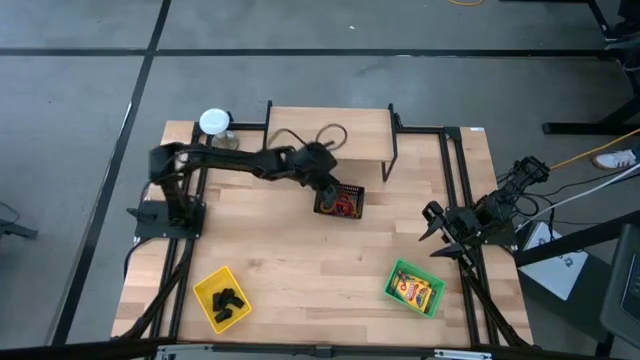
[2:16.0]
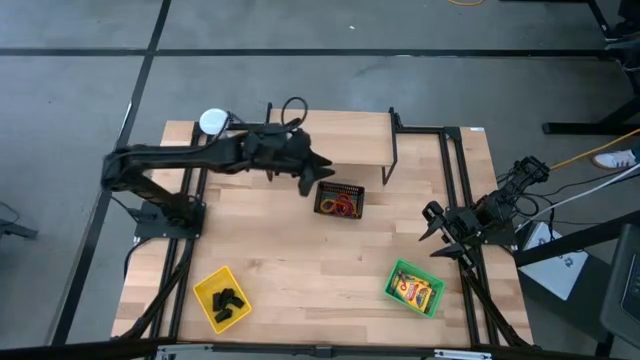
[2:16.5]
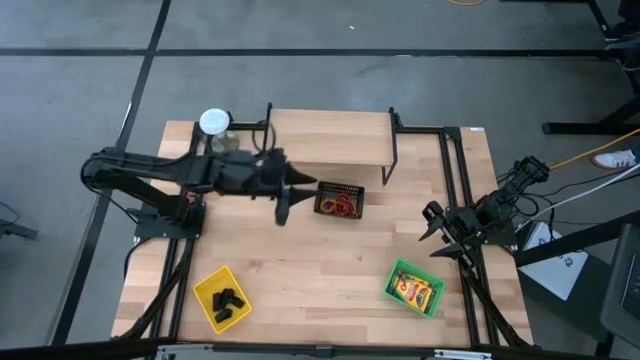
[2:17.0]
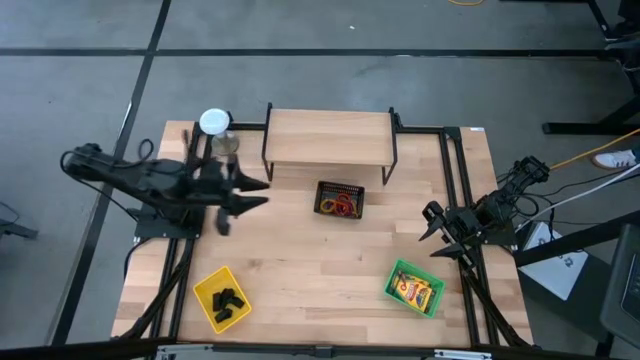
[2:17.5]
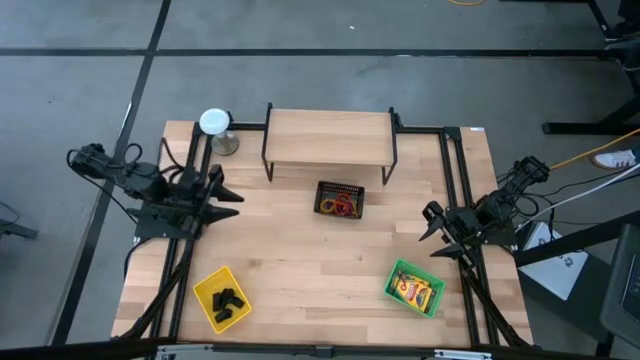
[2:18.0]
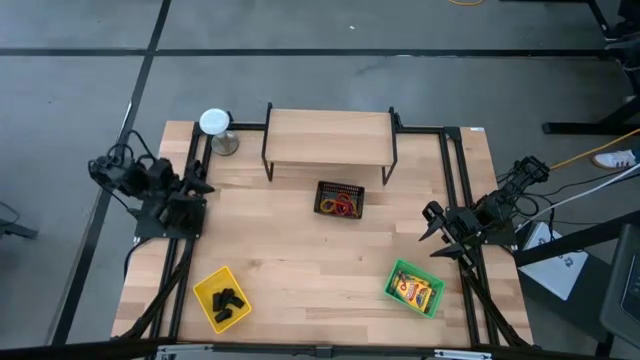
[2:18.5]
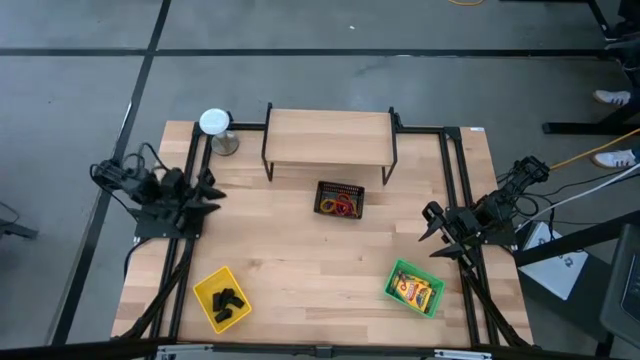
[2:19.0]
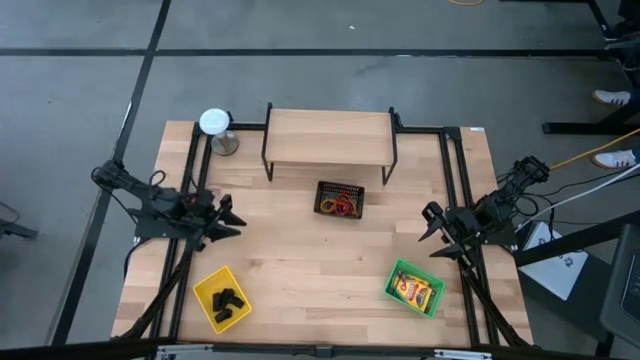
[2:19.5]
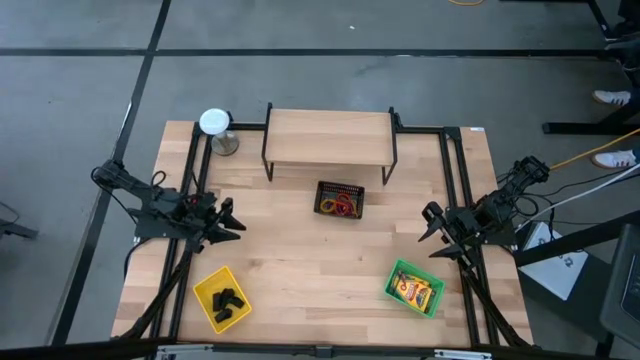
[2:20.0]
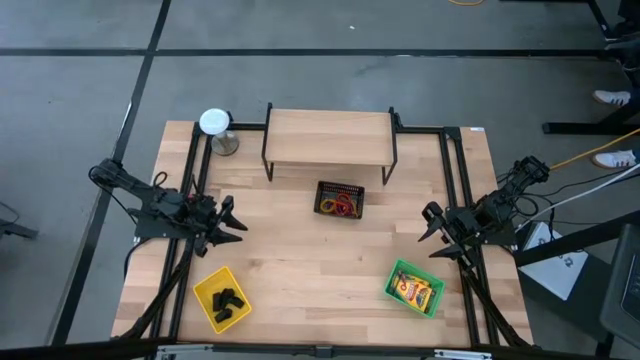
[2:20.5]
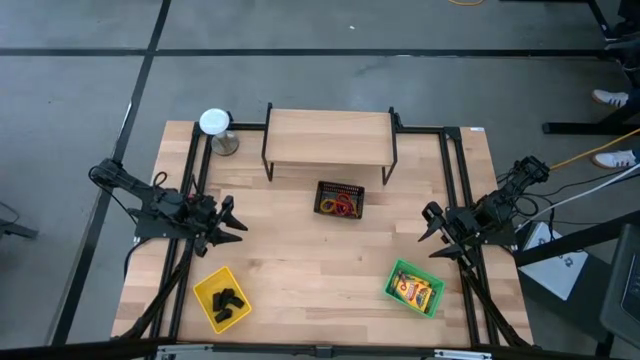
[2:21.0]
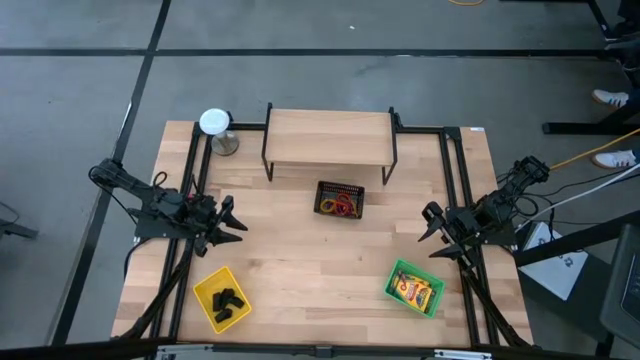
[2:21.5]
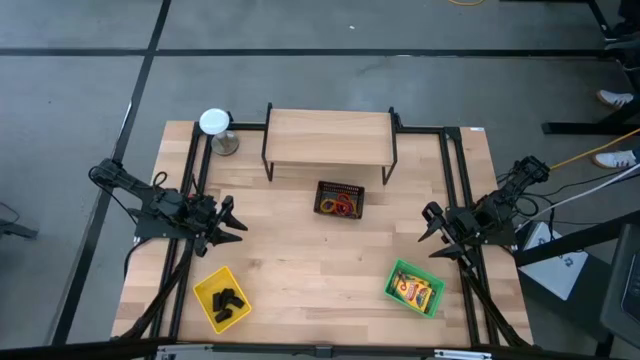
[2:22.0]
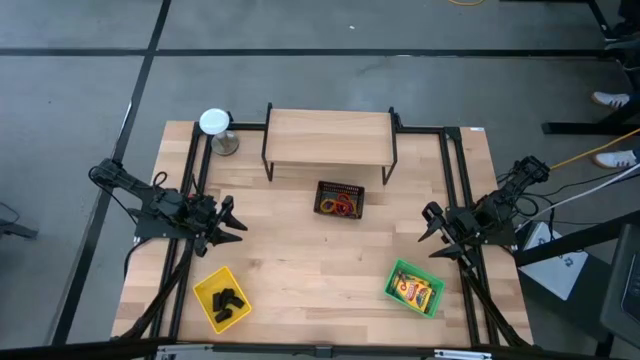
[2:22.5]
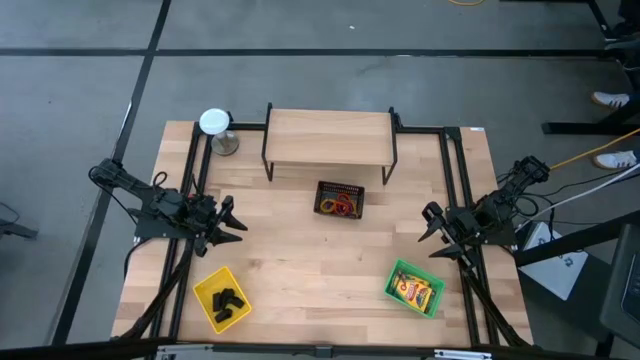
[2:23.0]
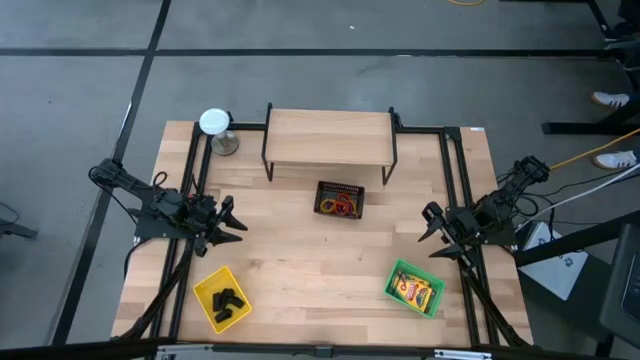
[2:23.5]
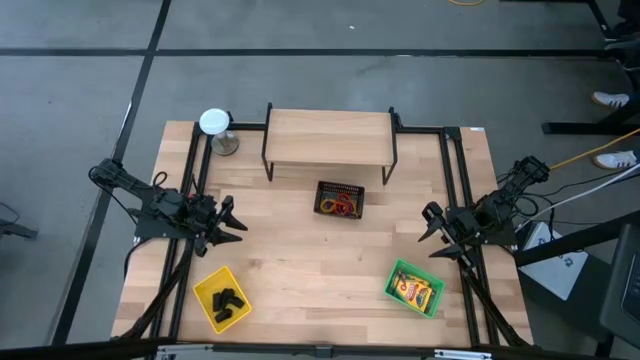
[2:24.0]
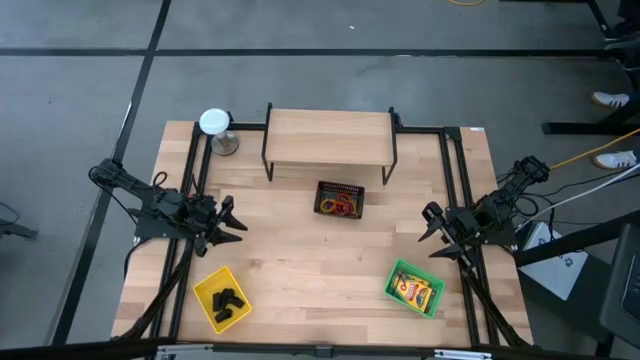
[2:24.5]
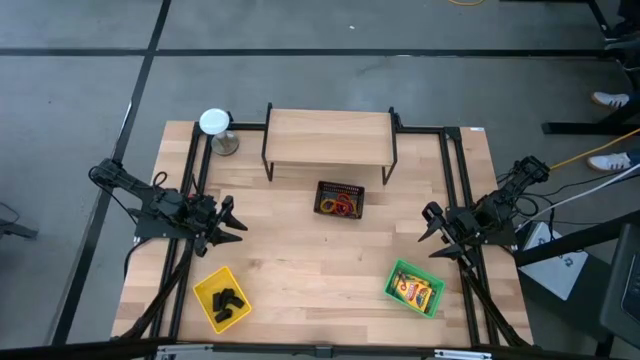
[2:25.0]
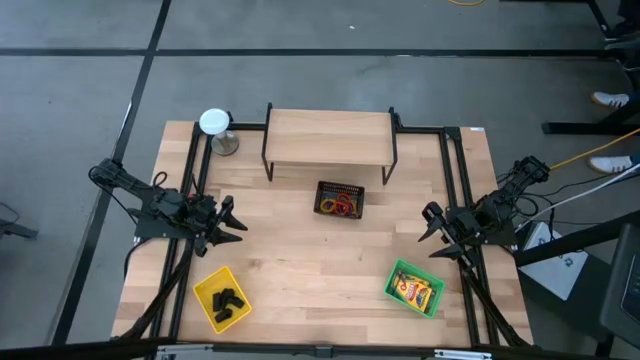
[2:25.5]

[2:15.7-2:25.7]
Task: Pick & Place Office Desk Supplies
Return to Home Position

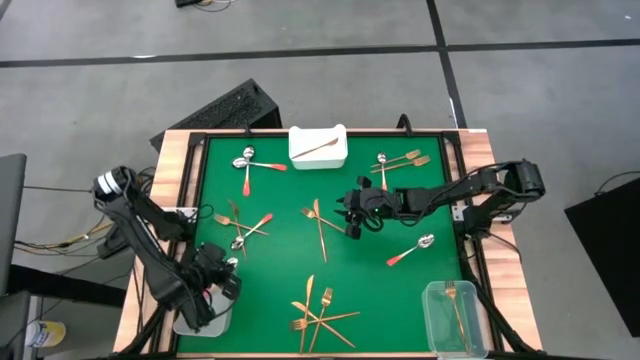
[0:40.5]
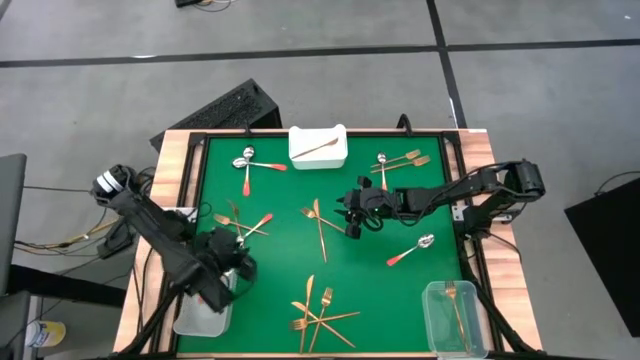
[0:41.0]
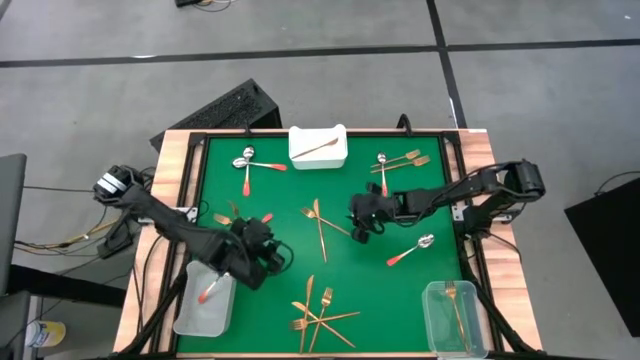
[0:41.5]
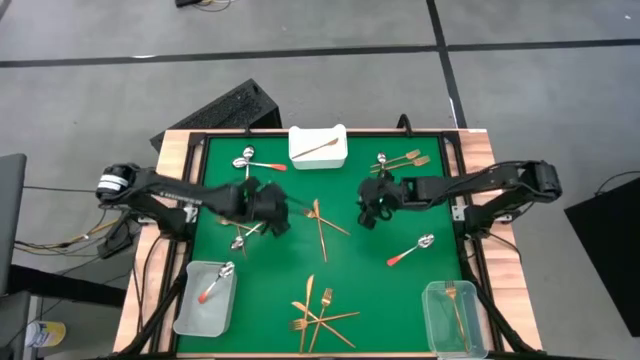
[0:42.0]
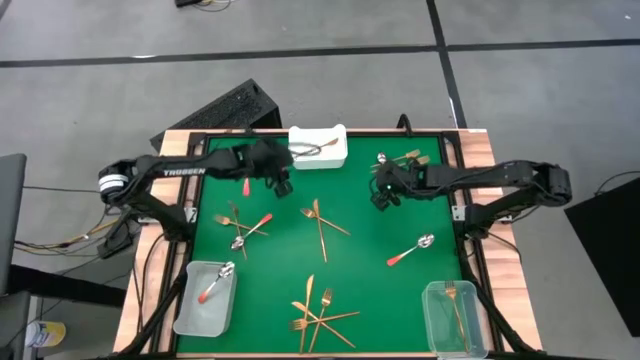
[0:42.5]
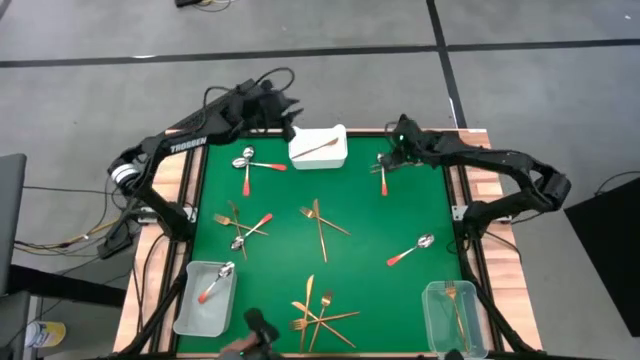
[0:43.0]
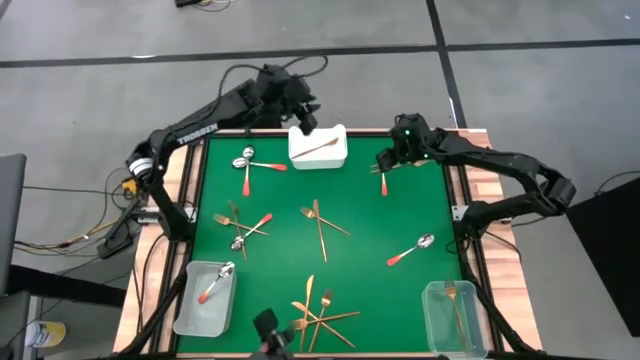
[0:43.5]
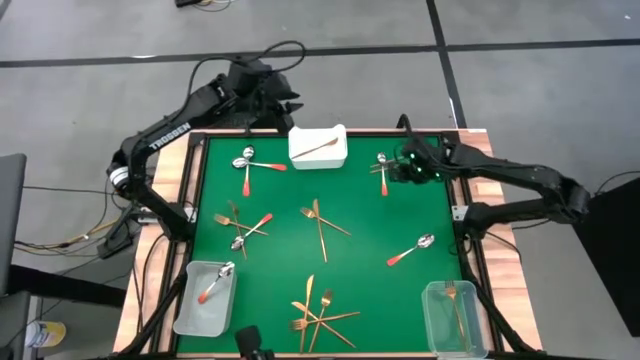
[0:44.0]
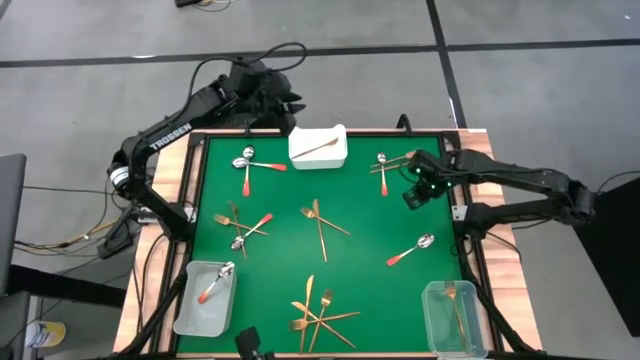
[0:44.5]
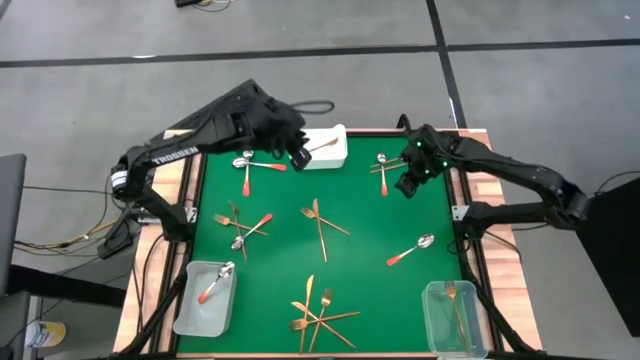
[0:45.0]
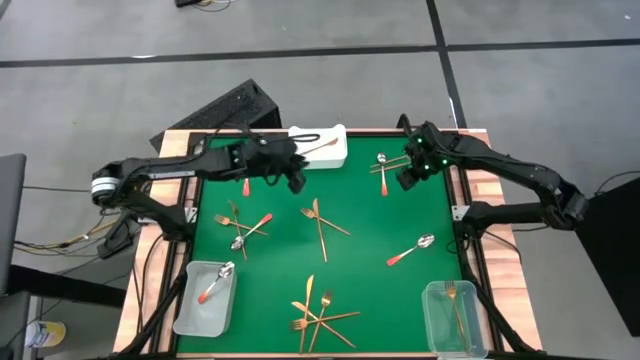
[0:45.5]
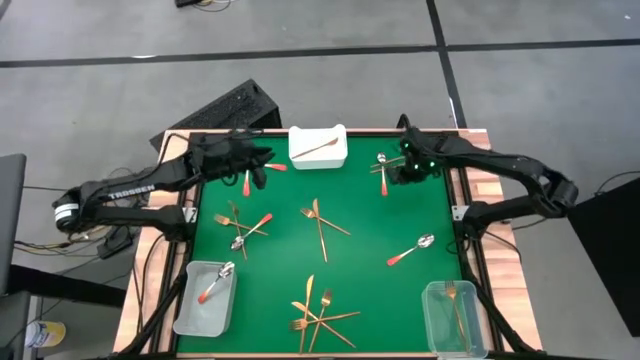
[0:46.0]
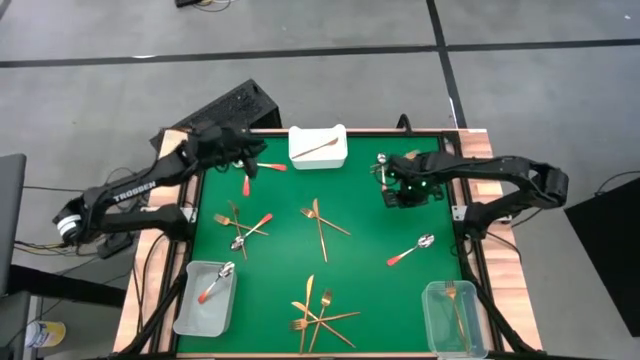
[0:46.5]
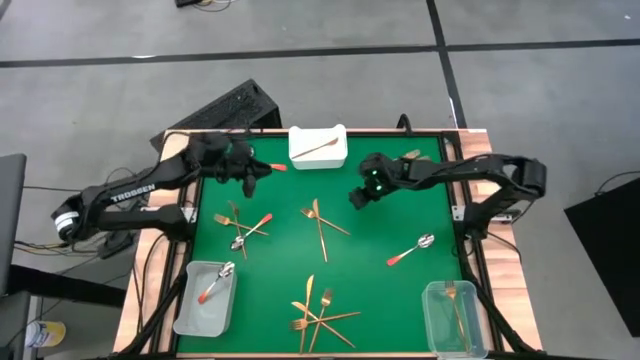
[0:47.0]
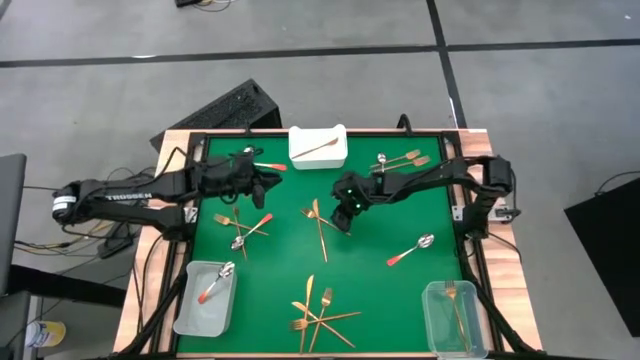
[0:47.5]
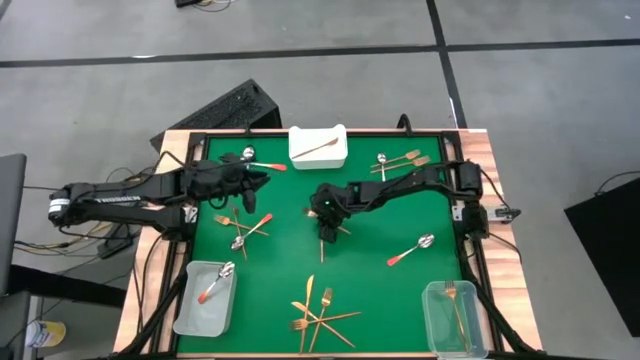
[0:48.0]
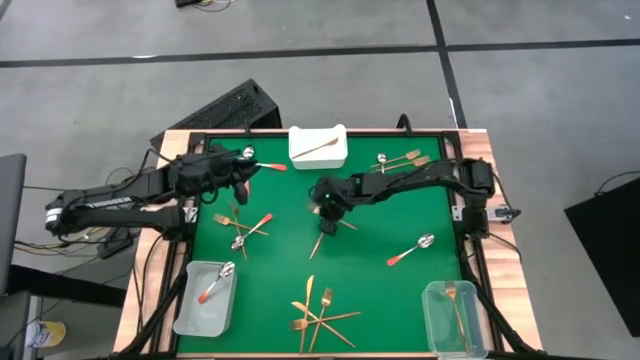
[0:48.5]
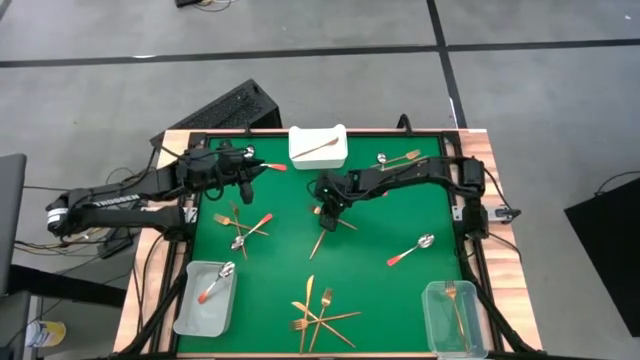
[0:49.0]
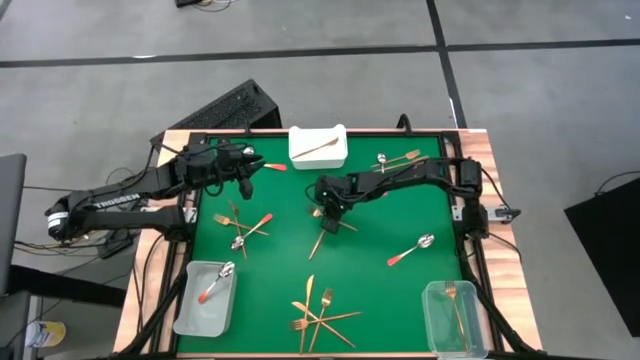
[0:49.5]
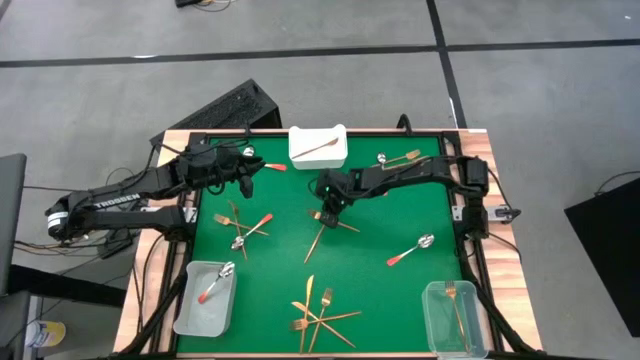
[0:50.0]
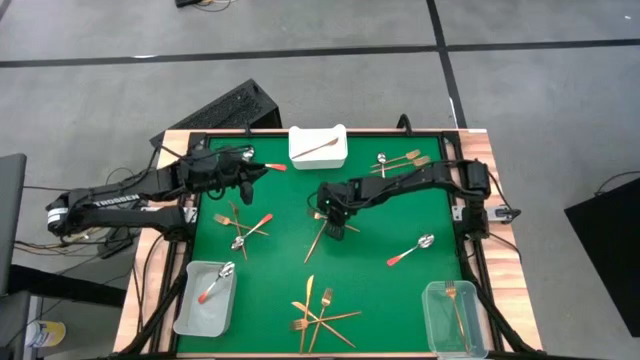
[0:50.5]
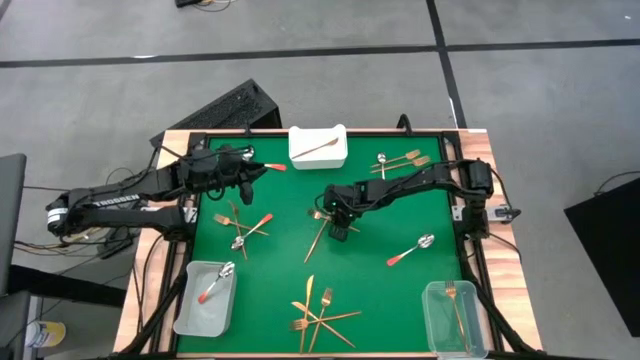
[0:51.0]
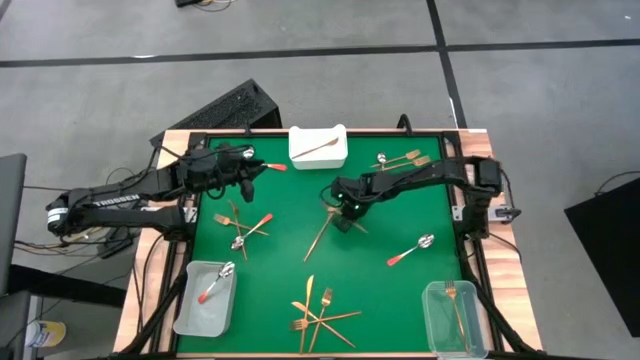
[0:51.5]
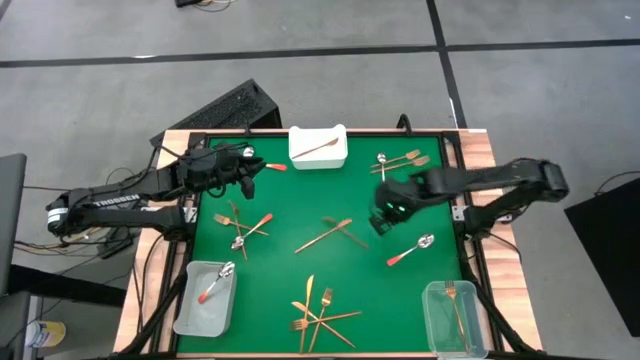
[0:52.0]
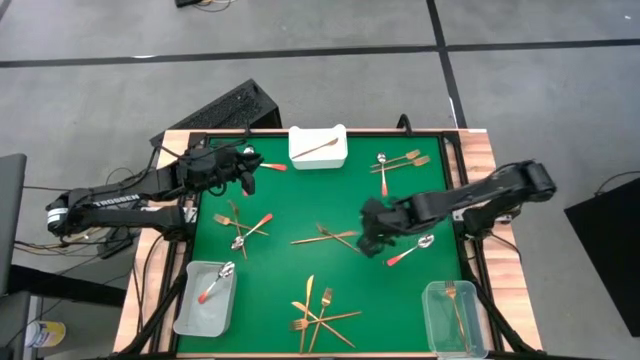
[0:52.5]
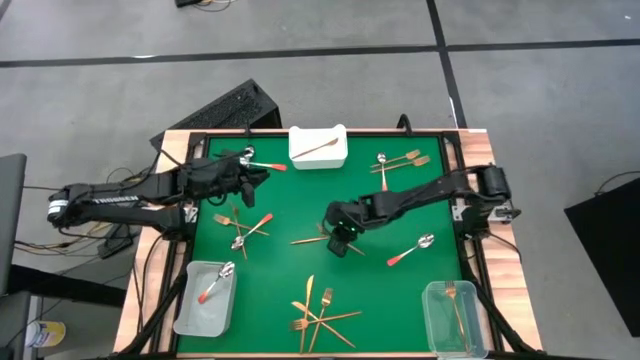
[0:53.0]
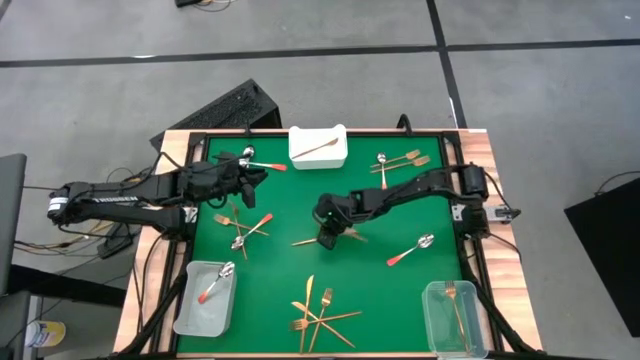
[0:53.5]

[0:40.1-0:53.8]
Task: Sort silverware by color (type)
Put the gold fork into the transparent bin
